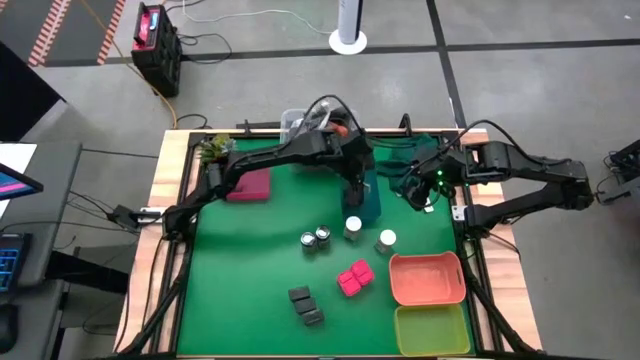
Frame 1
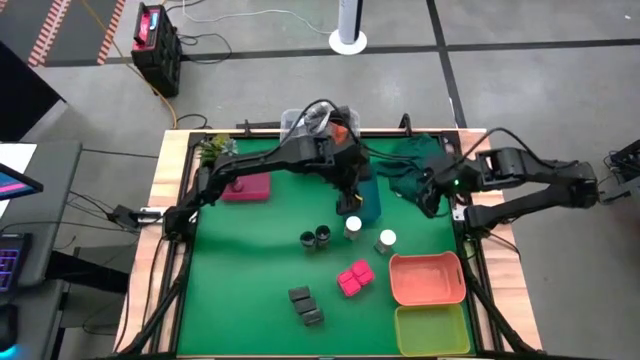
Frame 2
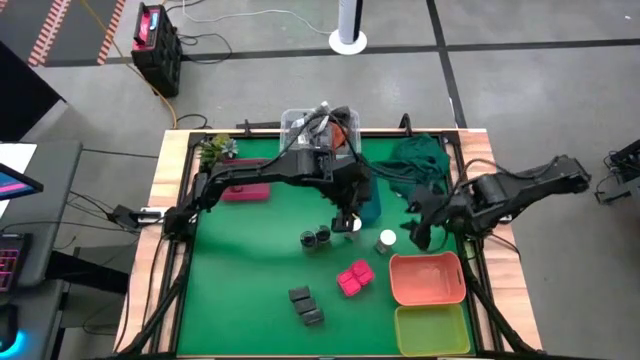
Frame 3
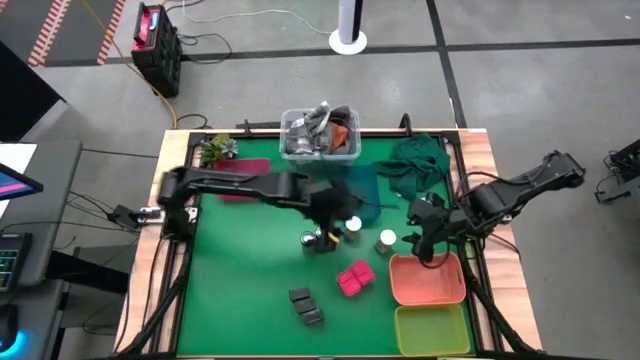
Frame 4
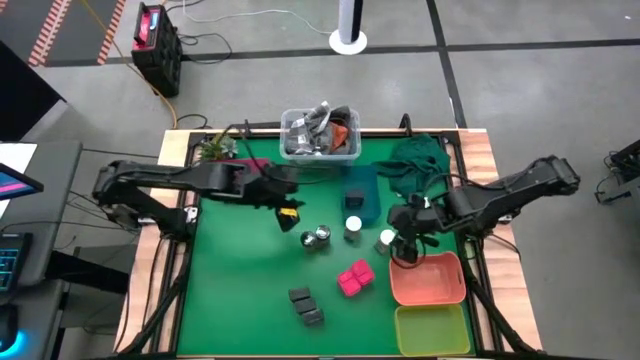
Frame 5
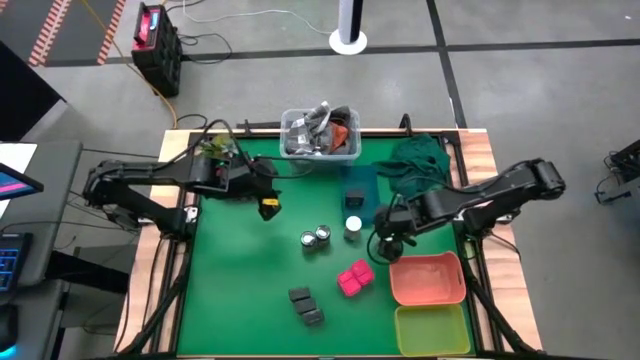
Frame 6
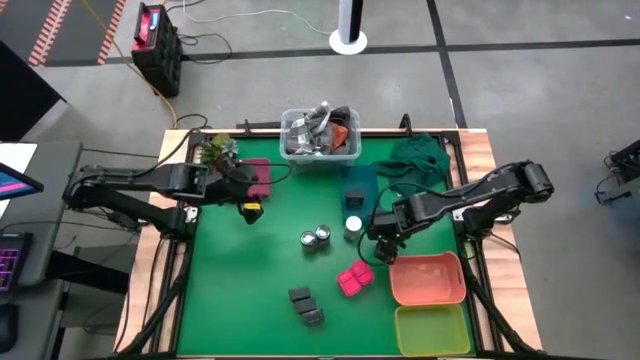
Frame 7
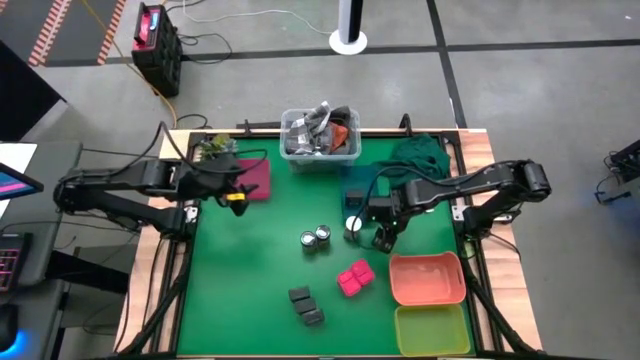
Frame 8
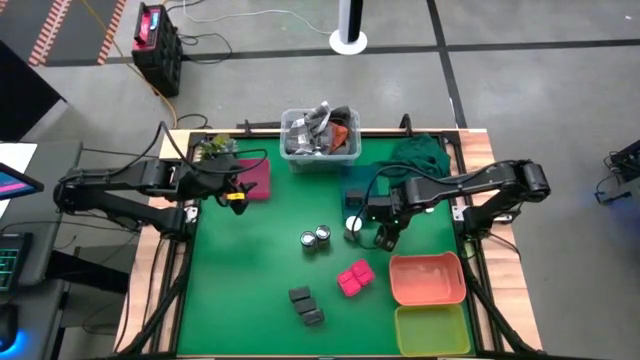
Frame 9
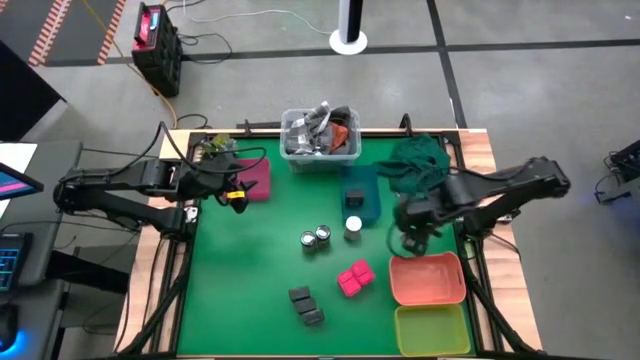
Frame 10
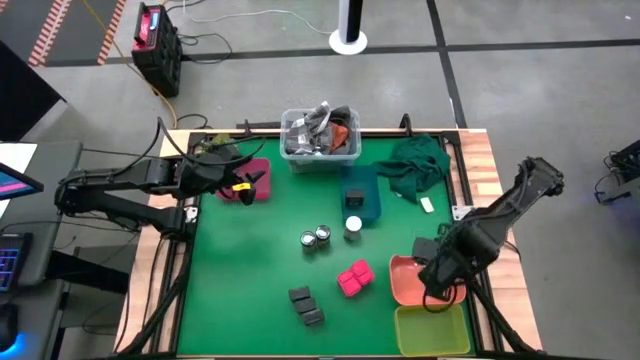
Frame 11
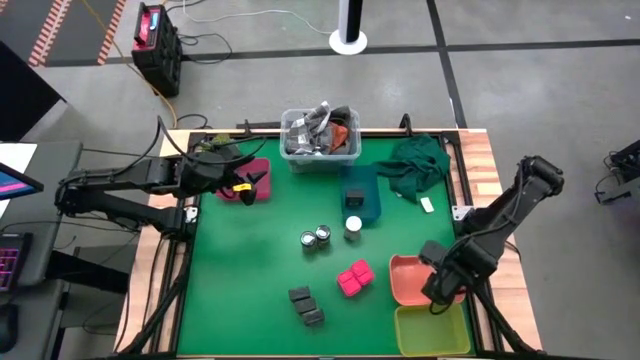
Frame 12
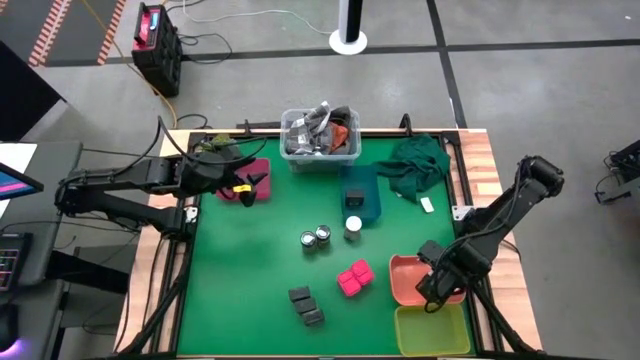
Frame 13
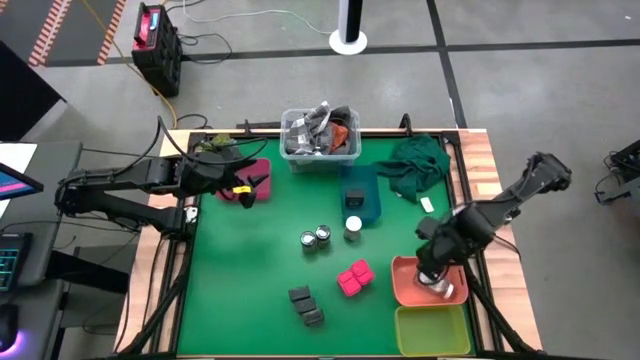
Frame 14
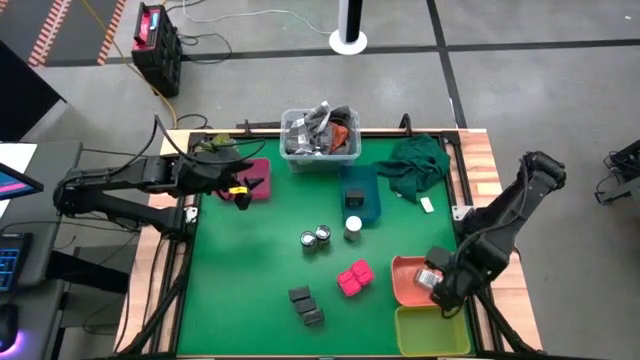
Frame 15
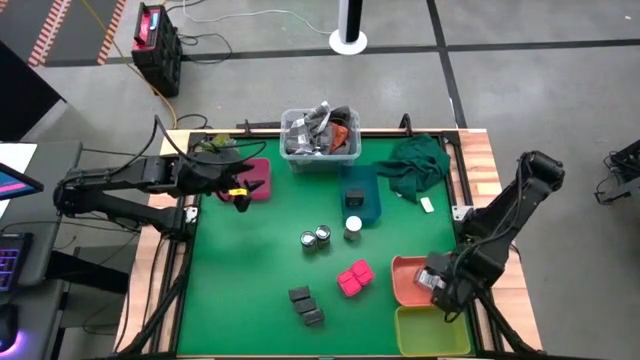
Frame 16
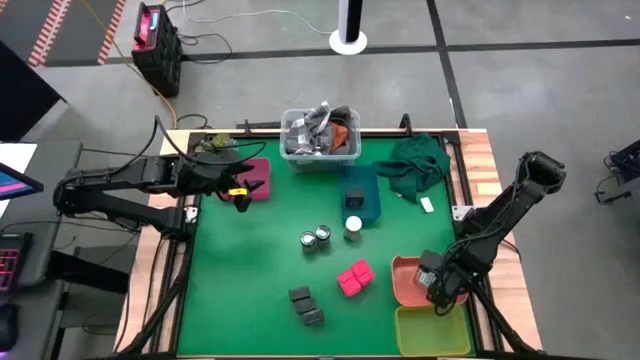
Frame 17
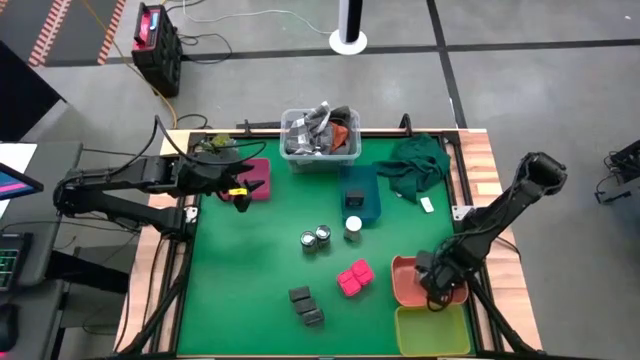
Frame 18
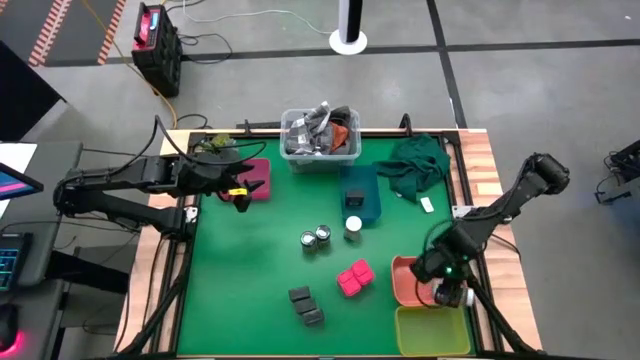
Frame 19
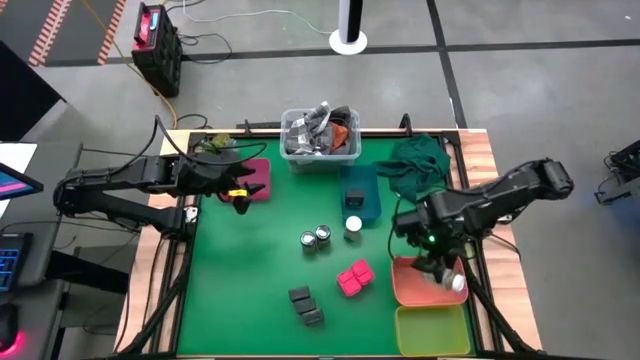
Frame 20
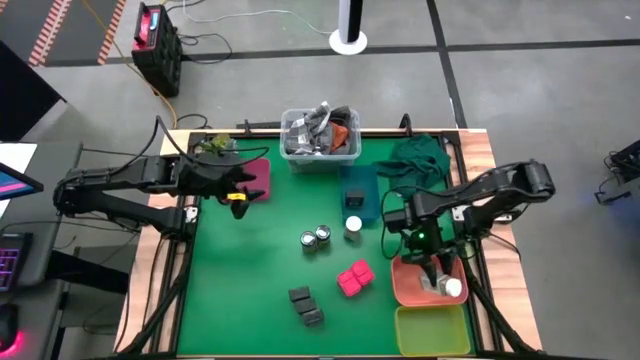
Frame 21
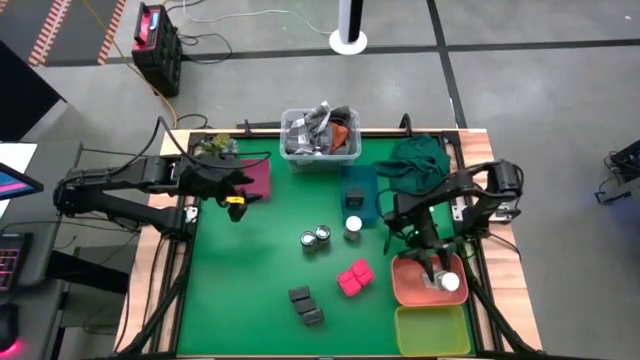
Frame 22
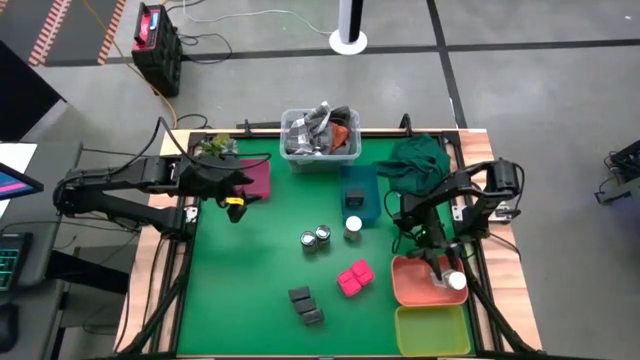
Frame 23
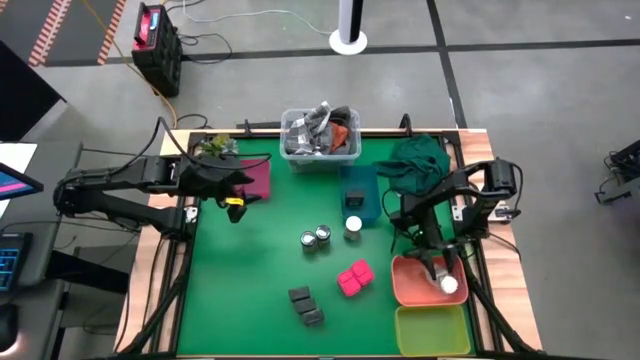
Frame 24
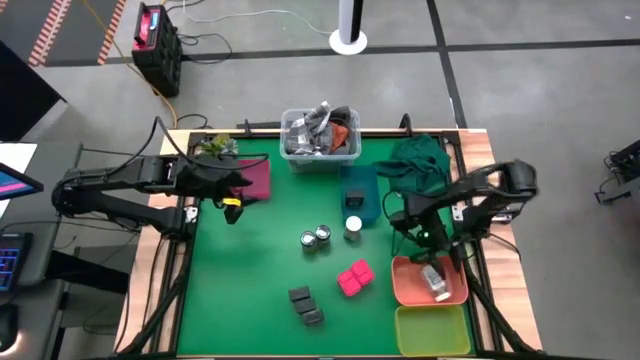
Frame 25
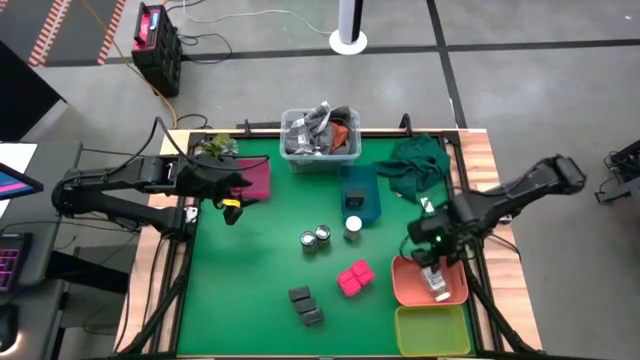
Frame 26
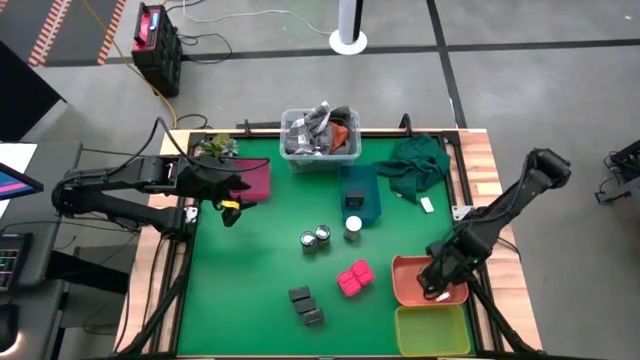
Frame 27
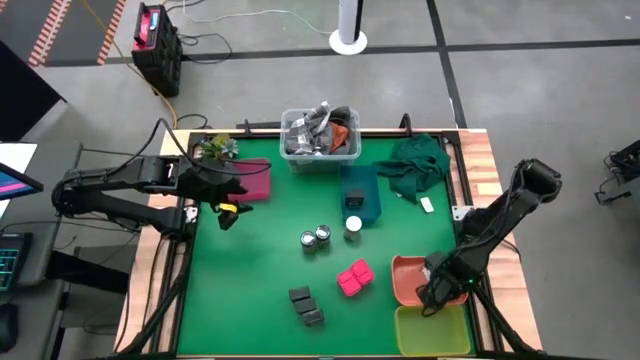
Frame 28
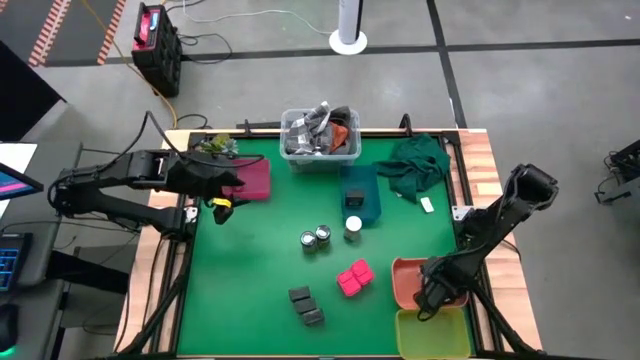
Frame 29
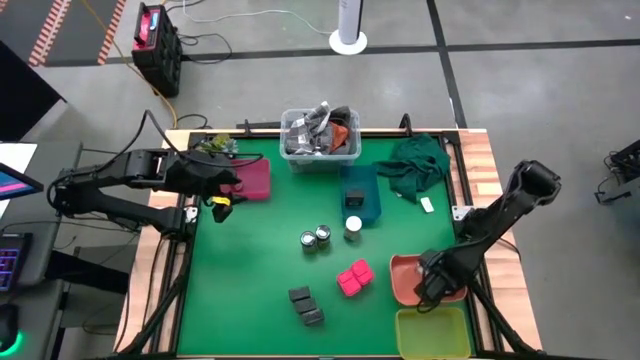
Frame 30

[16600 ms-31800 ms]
Task: Sort spices by type
Put the white seasoning bottle into the orange bin

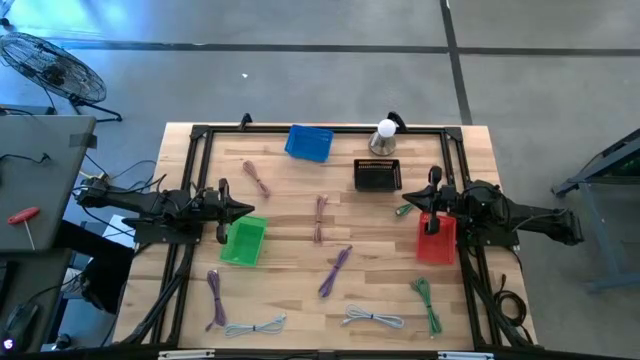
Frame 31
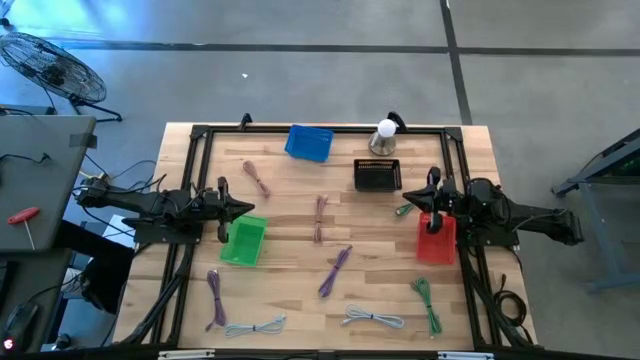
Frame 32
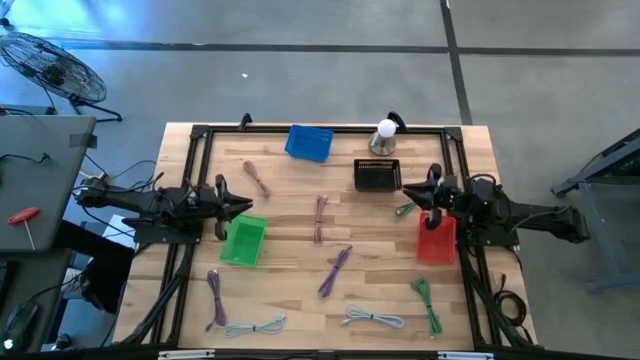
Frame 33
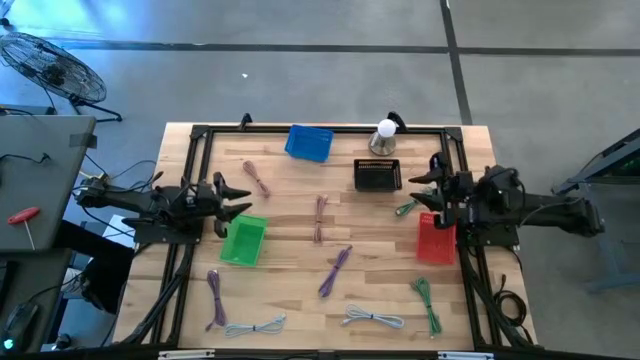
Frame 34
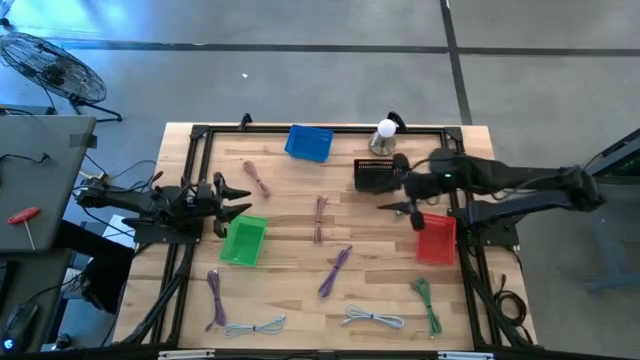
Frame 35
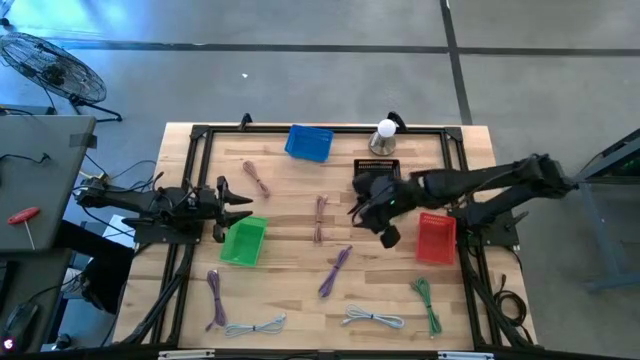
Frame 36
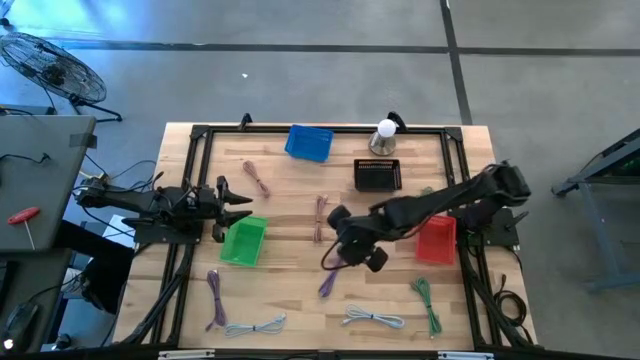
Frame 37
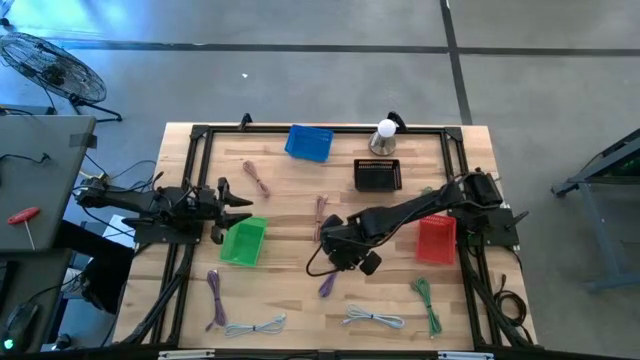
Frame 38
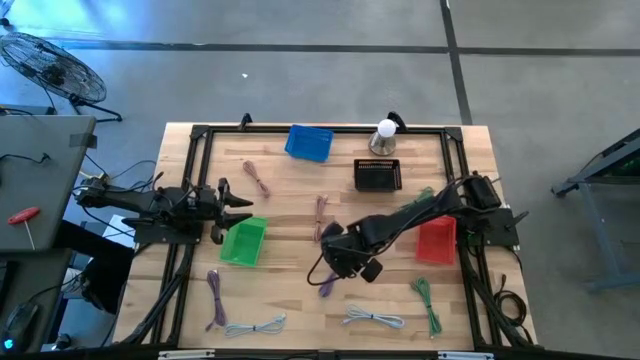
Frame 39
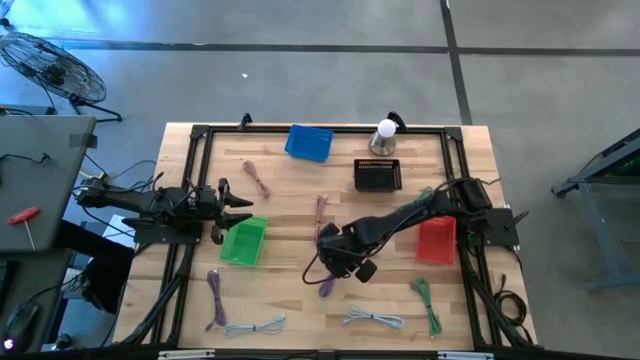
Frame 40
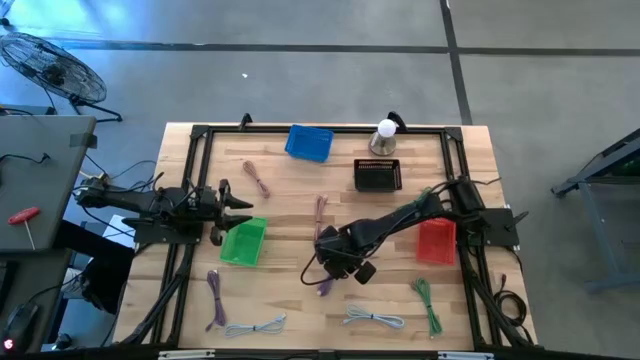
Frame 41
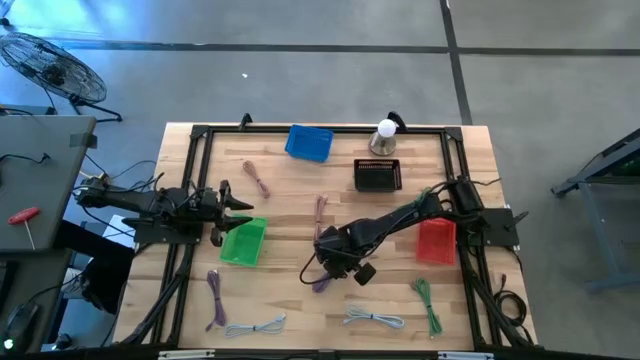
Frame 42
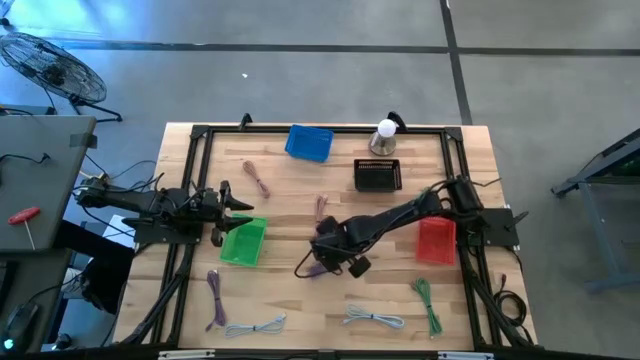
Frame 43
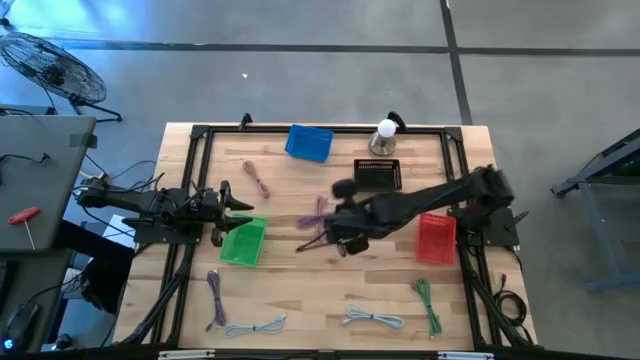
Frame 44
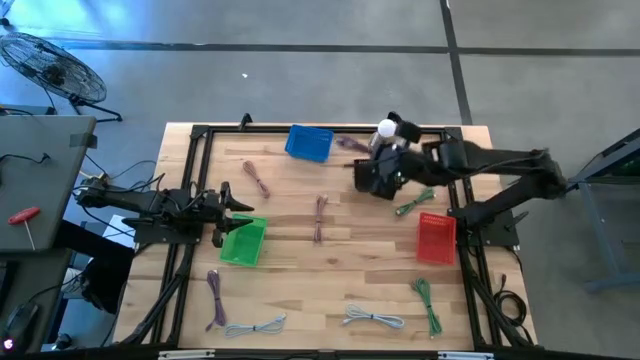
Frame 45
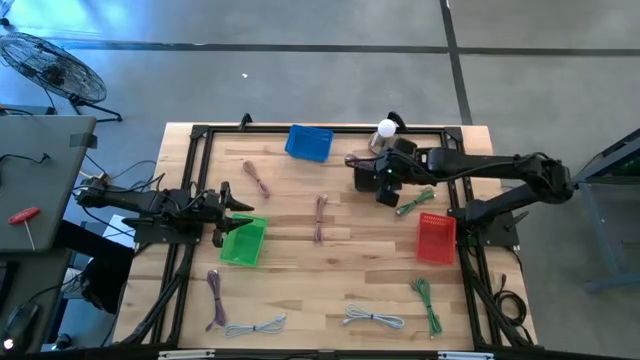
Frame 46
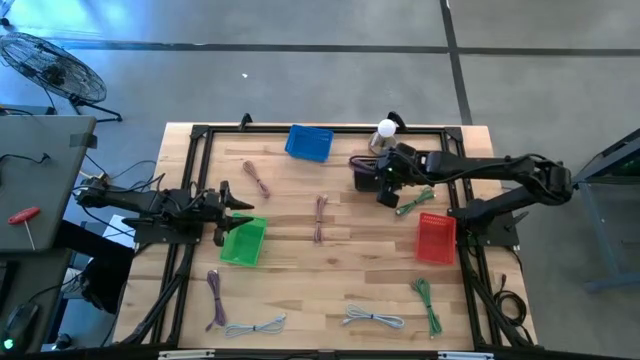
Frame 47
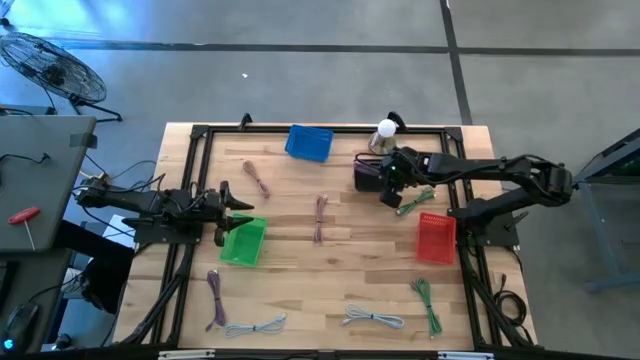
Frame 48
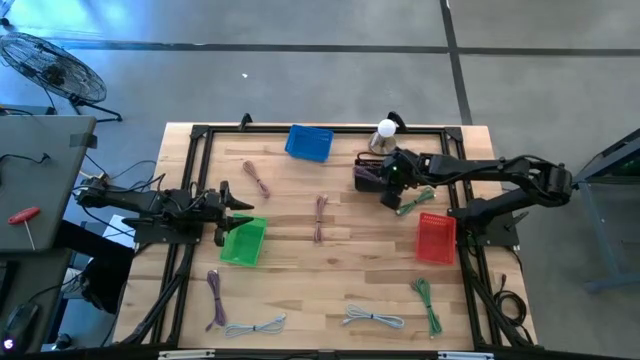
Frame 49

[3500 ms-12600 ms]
Task: Pick & Place USB Port
Put the right violet charger cable into the black bin
